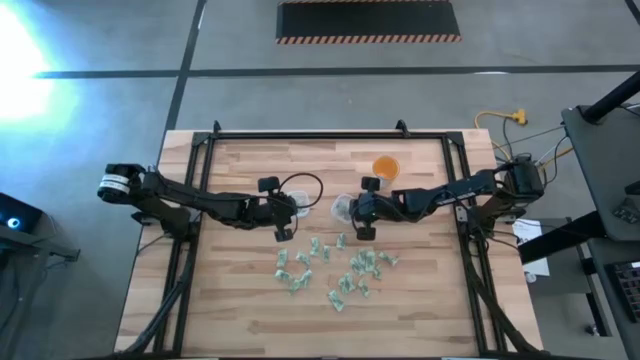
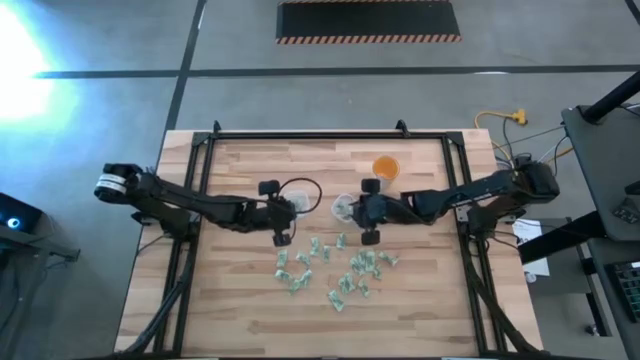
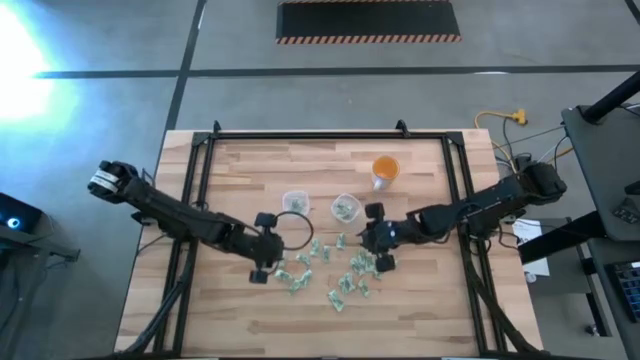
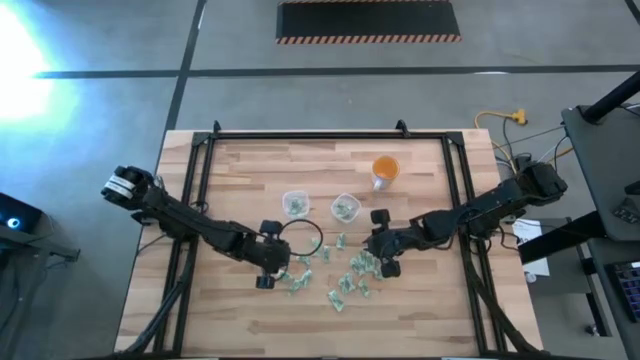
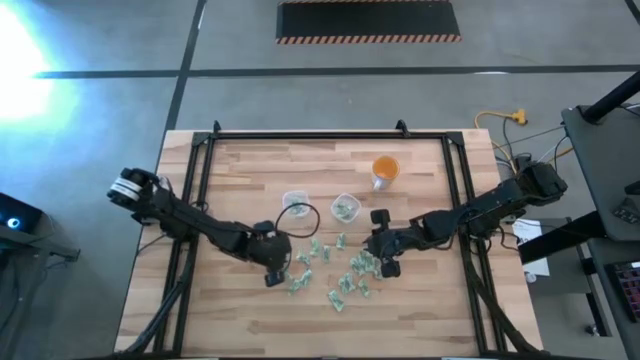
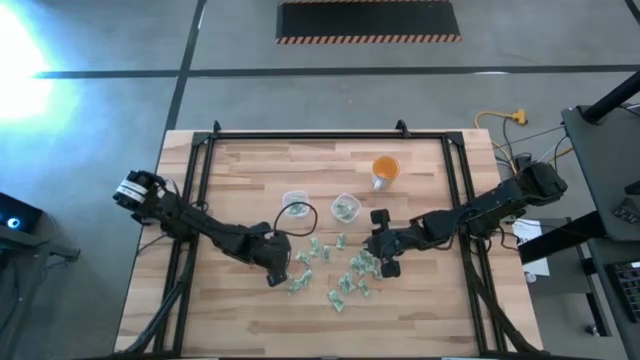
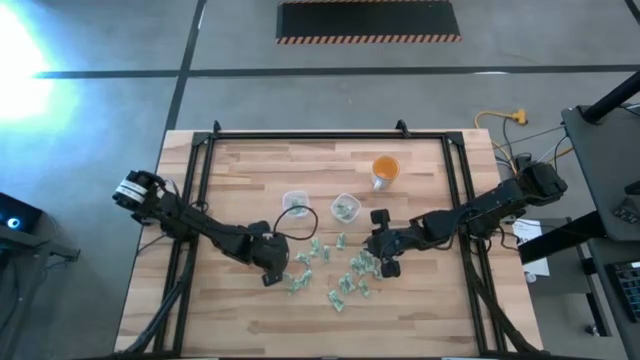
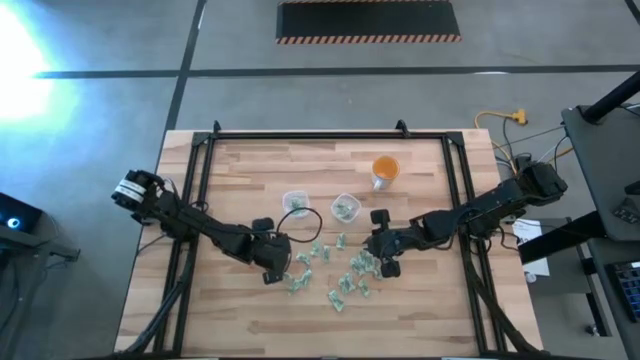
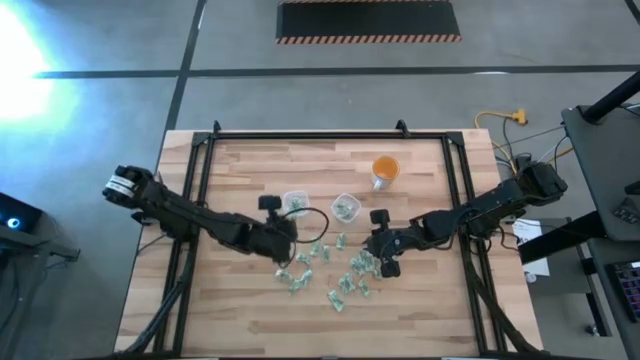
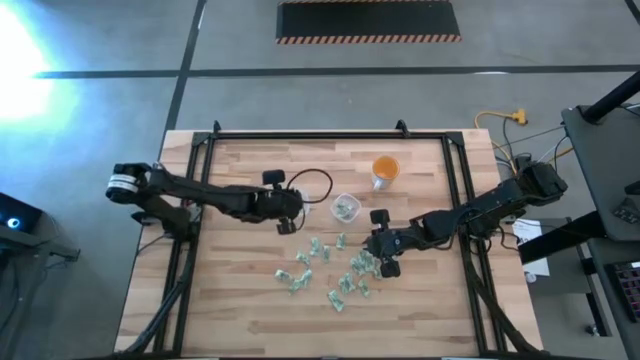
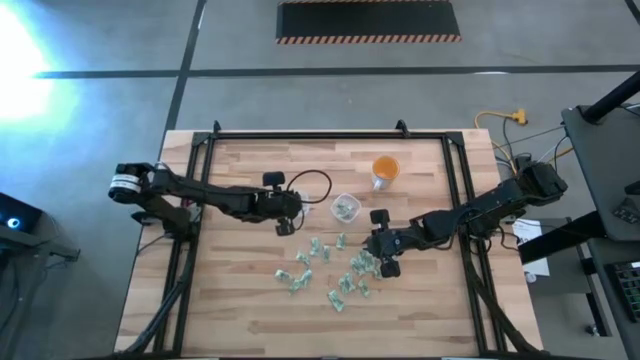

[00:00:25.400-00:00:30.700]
Task: Pick and place items into bin
Put the white stevia packet into the left transparent bin

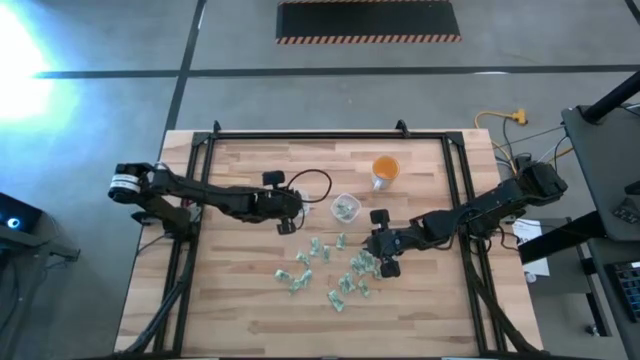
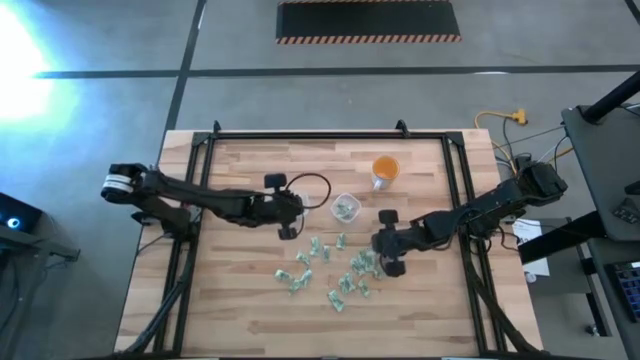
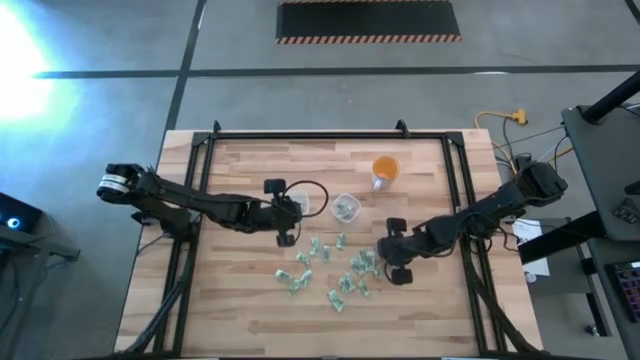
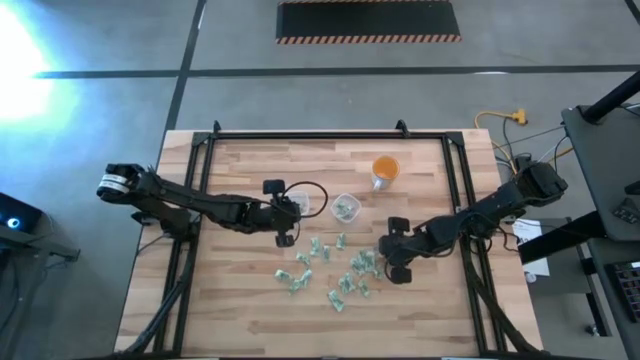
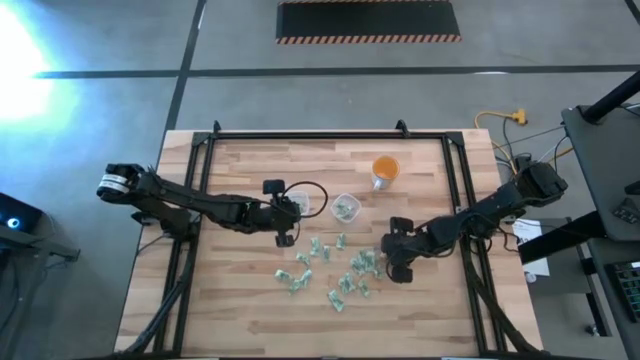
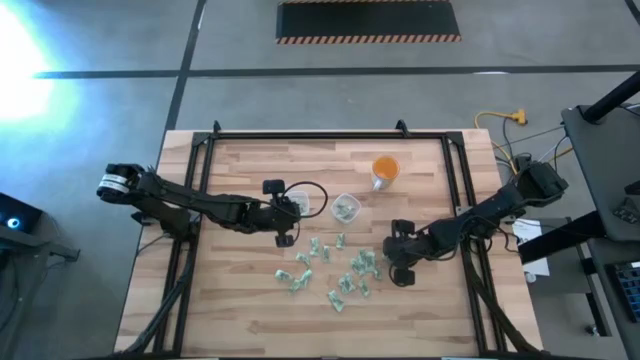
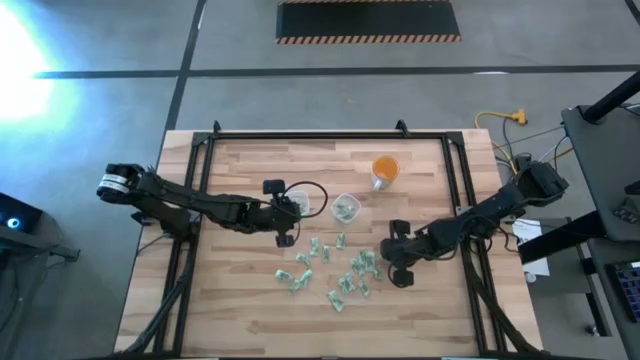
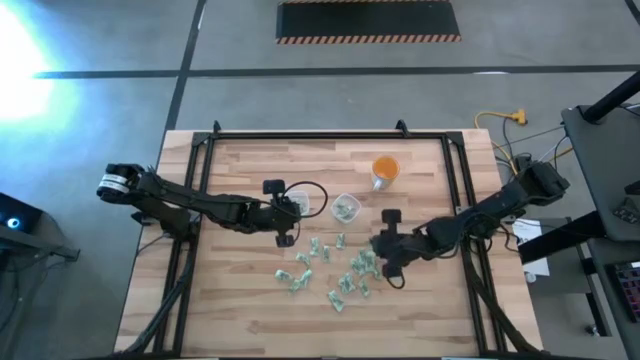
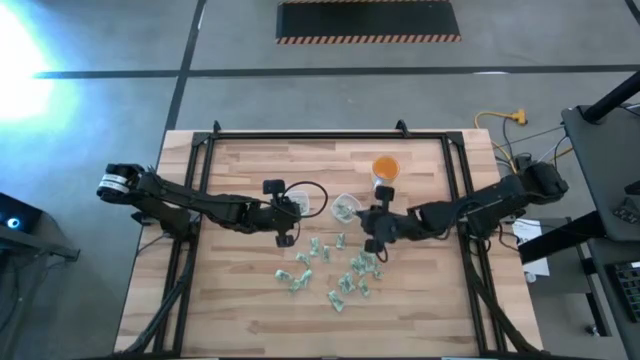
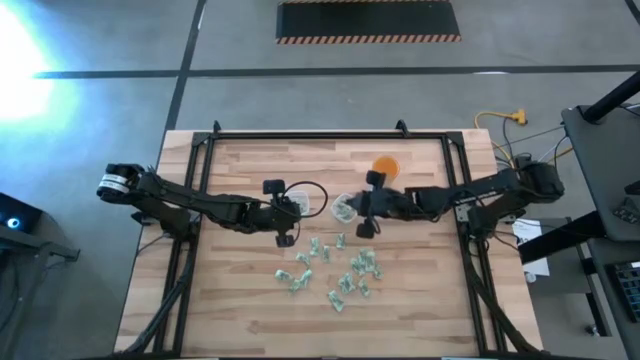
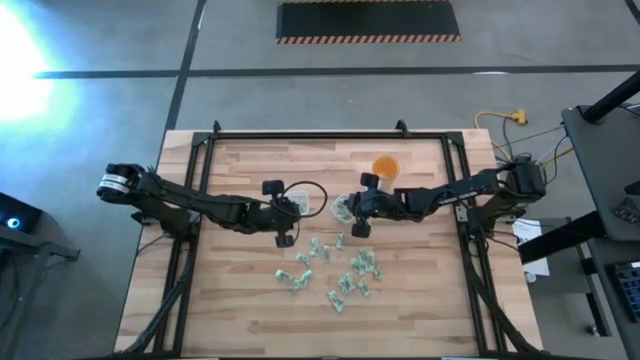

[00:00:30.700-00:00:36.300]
Put the white stevia packet into the right transparent bin

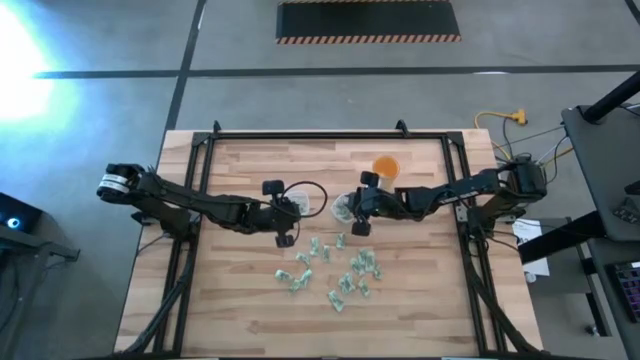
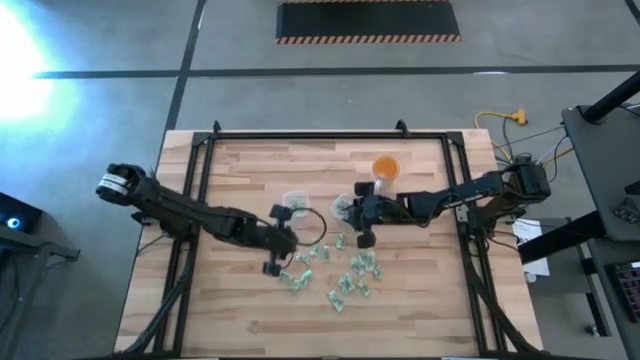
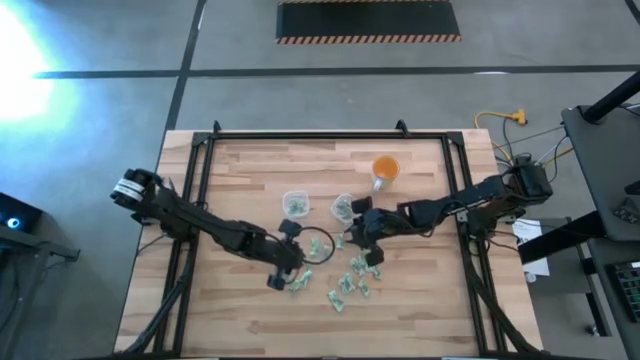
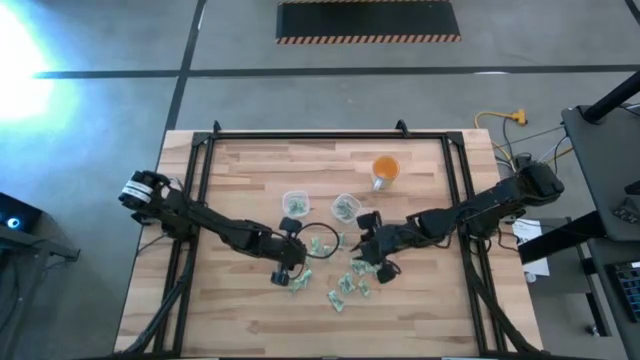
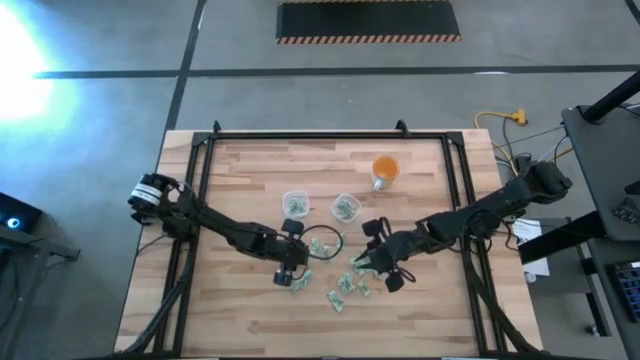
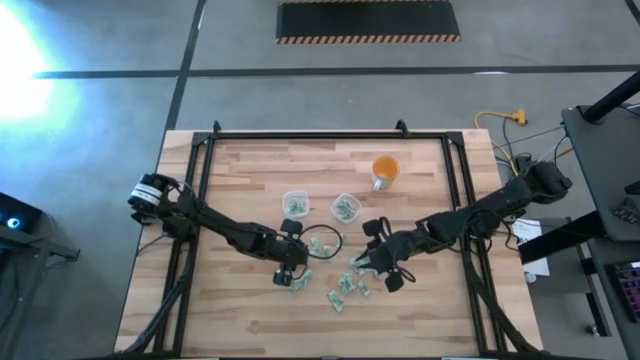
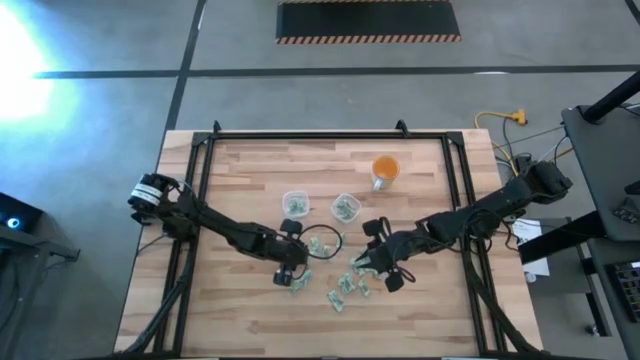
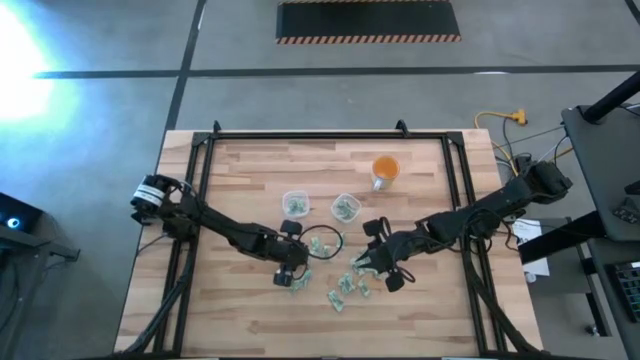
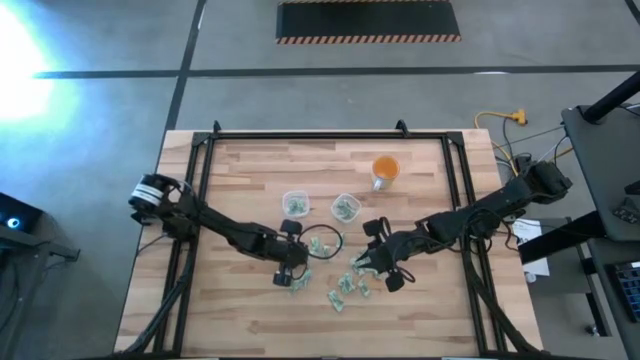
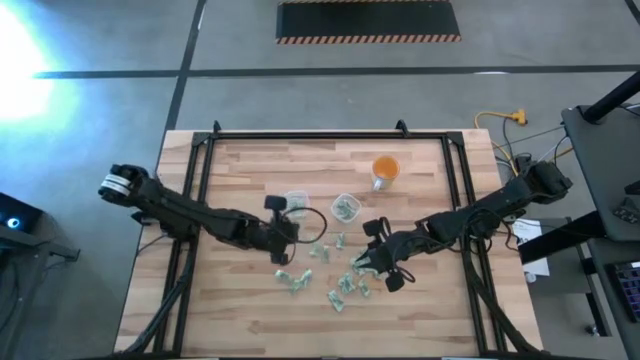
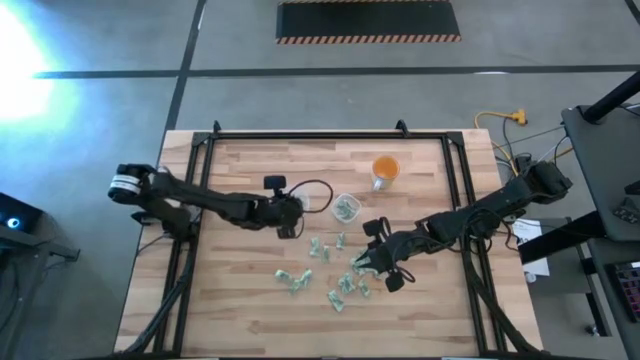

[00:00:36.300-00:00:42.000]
Put the white stevia packet into the left transparent bin

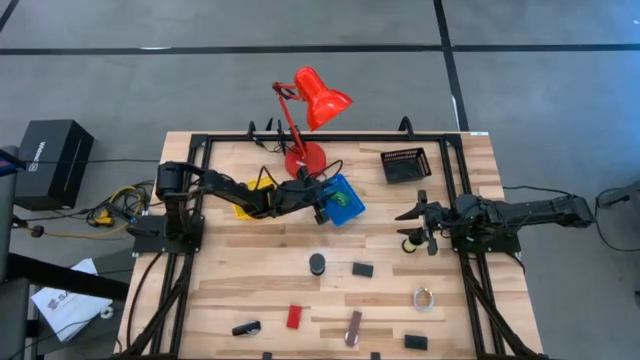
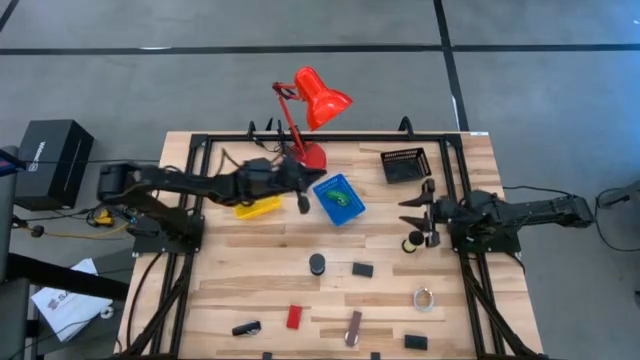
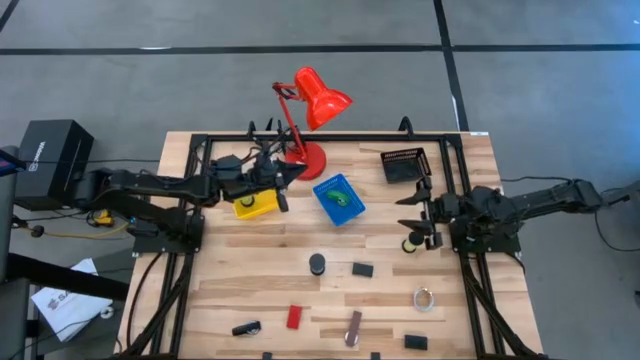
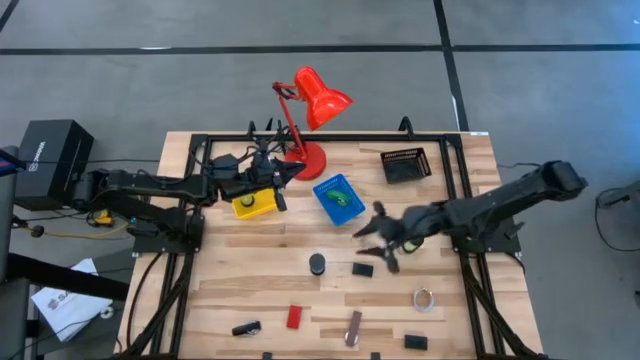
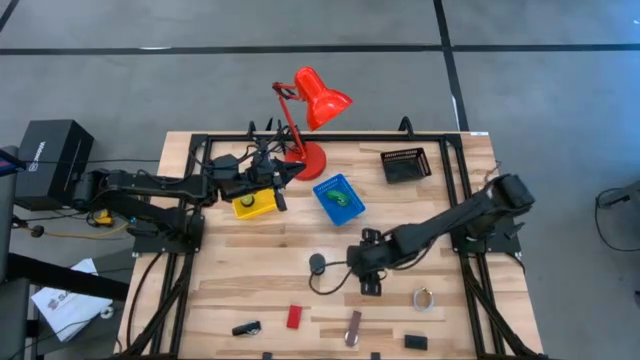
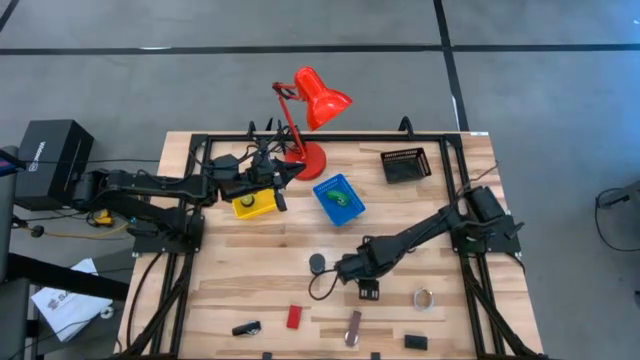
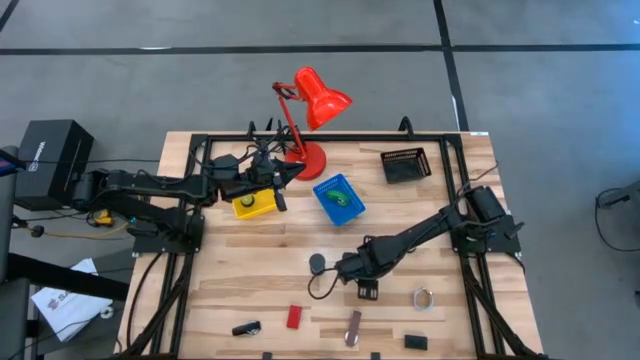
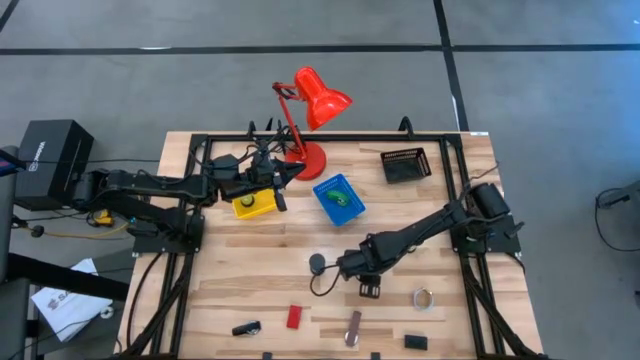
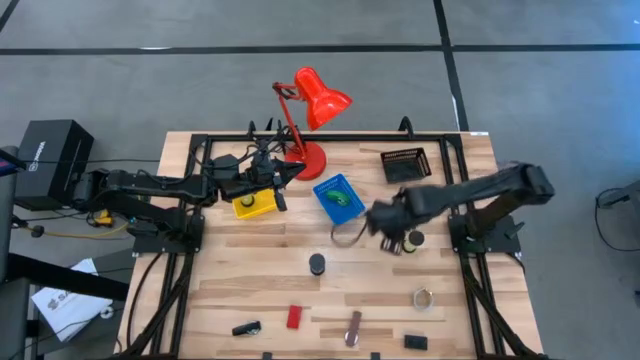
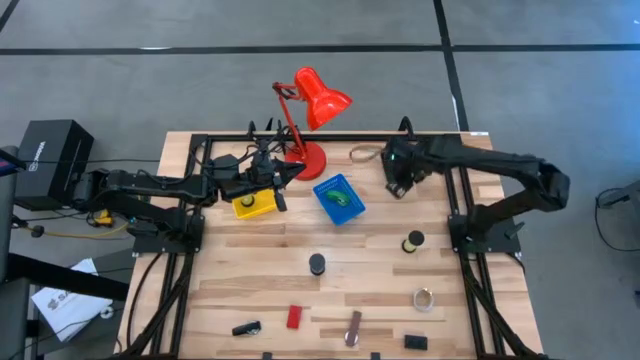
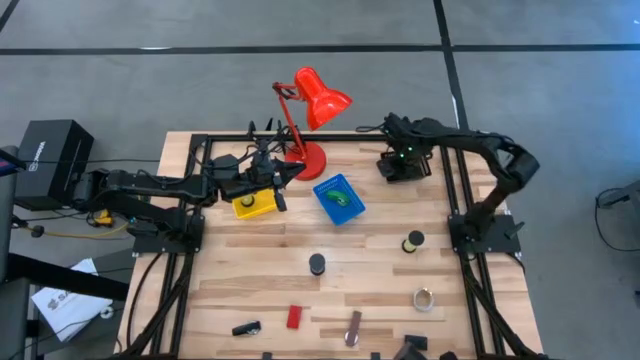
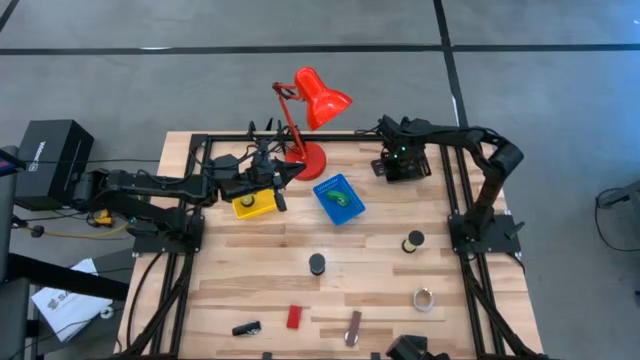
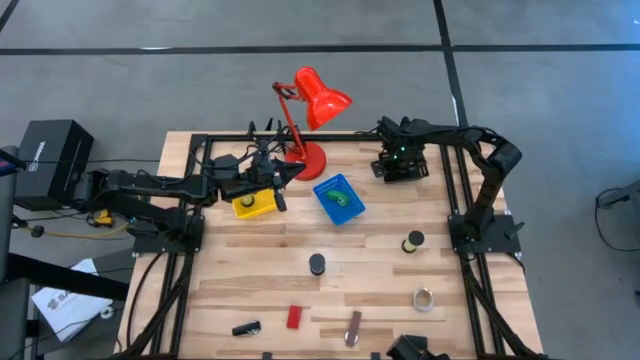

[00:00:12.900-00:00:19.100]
Task: Pick & Place Office items
Put the top black digital clock into the black bin
